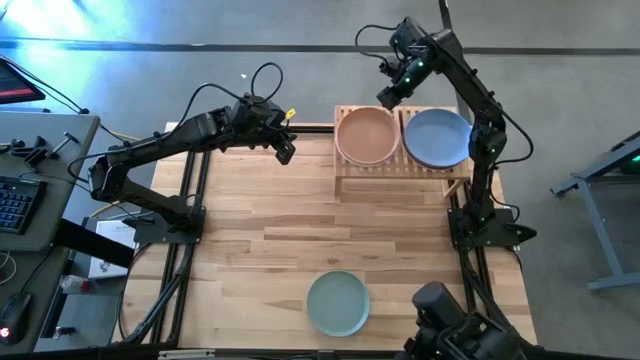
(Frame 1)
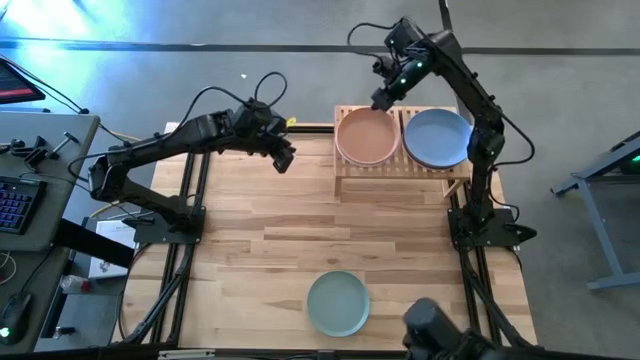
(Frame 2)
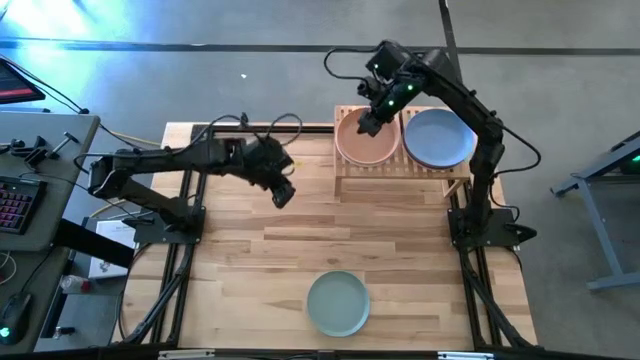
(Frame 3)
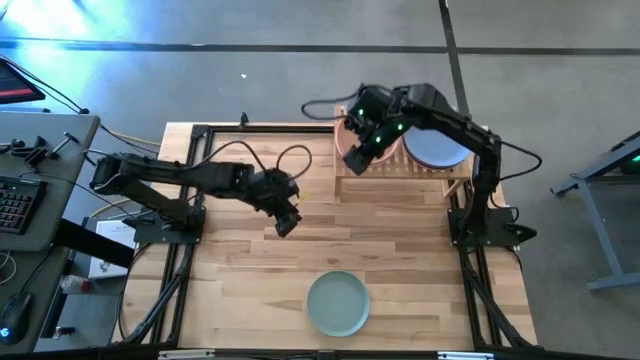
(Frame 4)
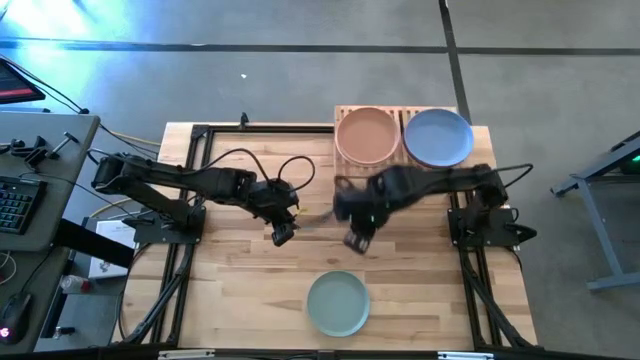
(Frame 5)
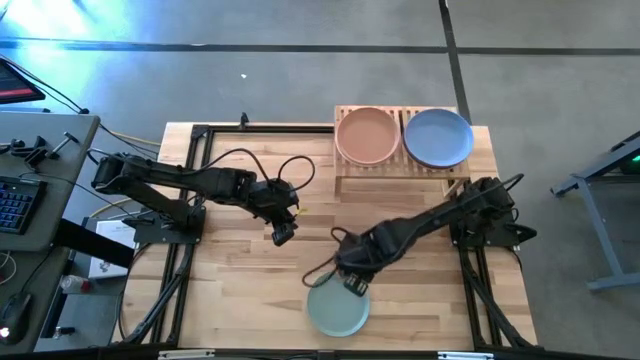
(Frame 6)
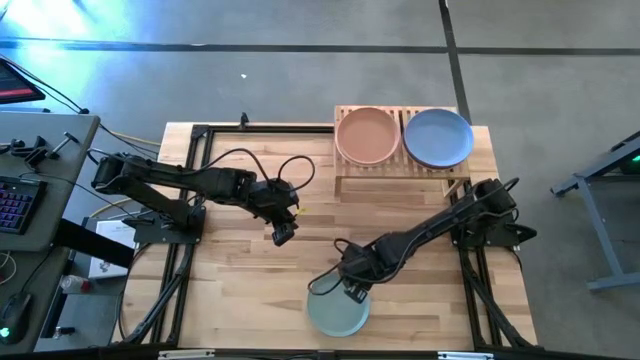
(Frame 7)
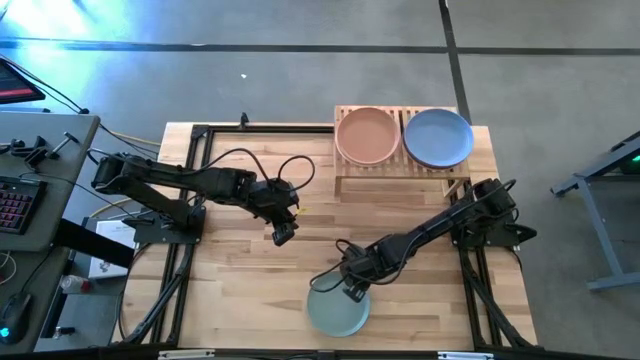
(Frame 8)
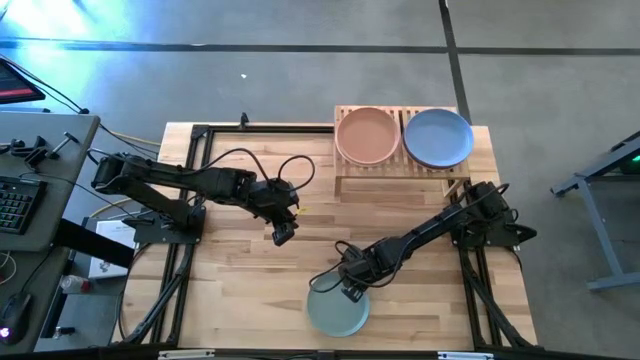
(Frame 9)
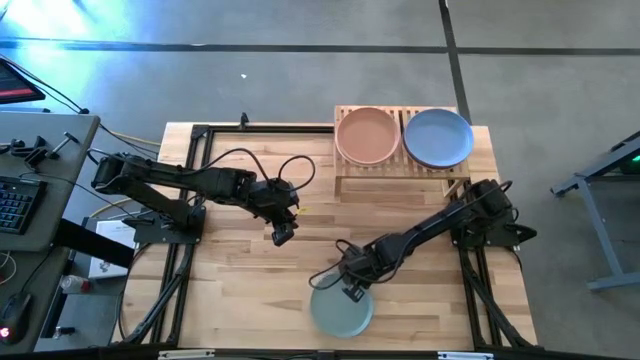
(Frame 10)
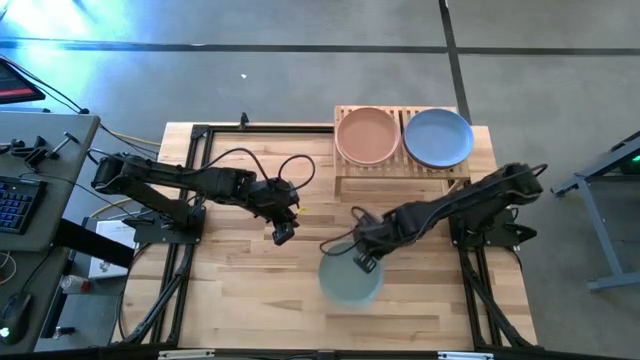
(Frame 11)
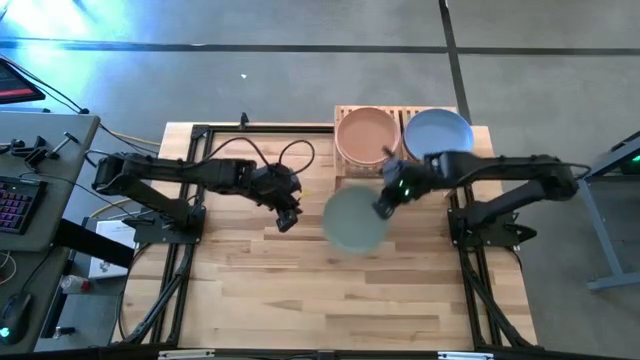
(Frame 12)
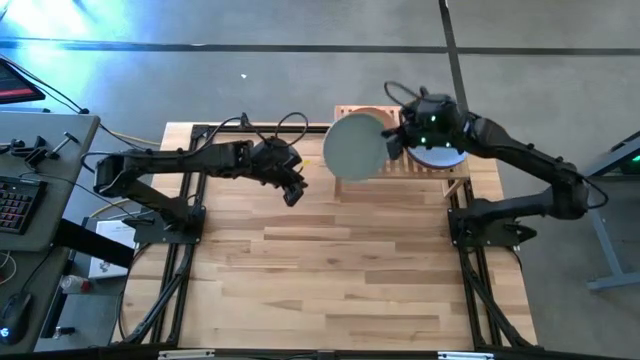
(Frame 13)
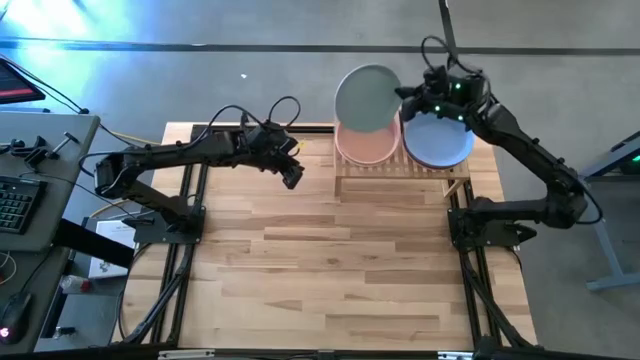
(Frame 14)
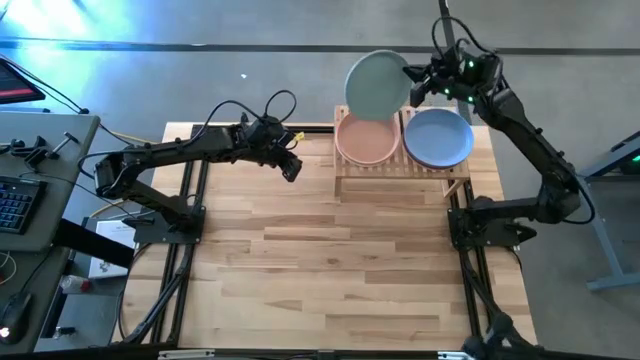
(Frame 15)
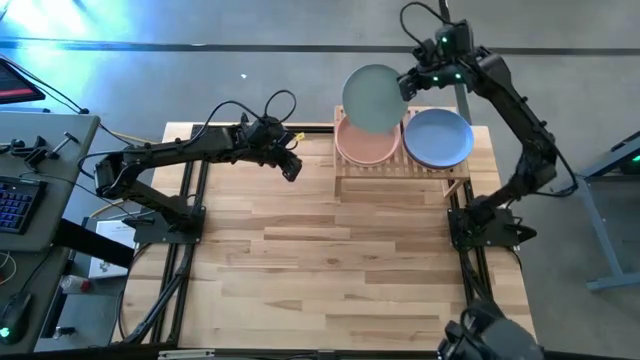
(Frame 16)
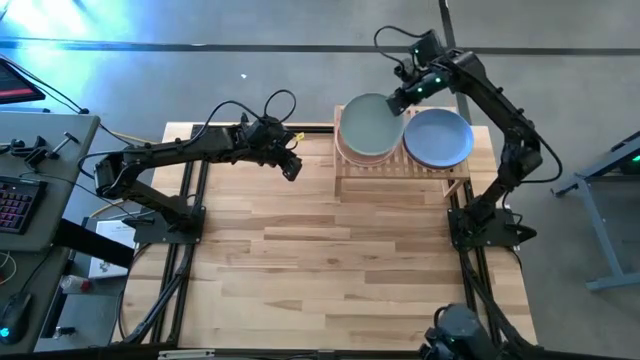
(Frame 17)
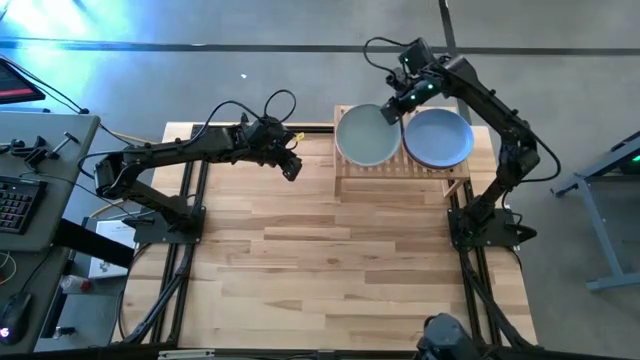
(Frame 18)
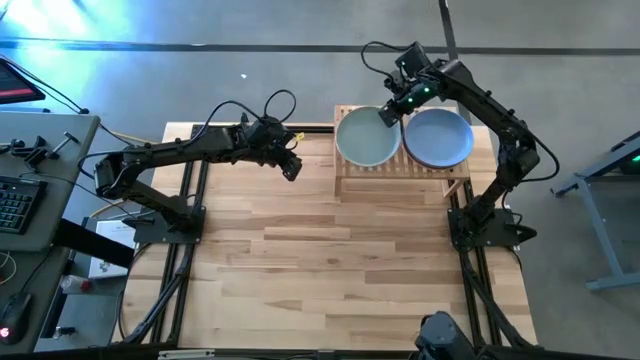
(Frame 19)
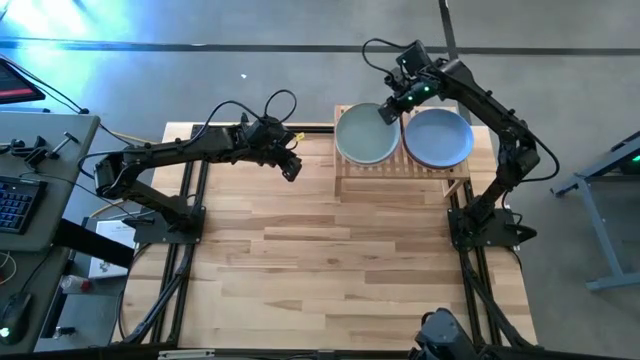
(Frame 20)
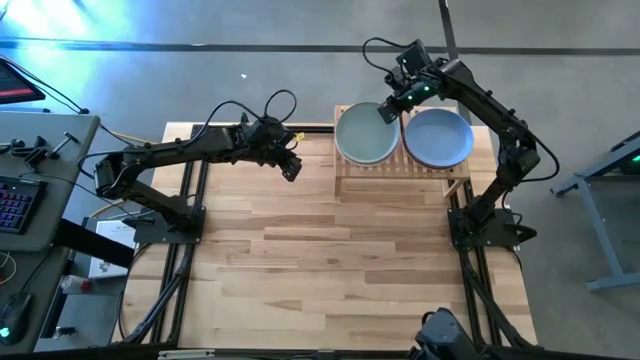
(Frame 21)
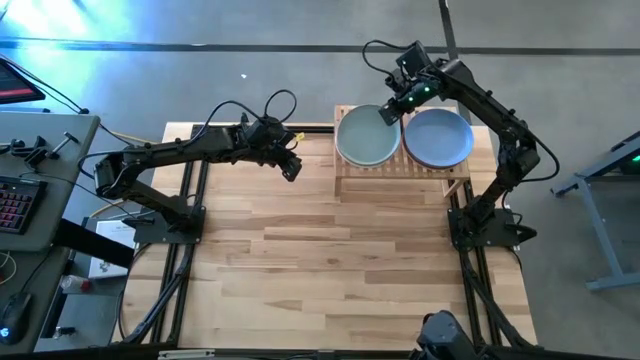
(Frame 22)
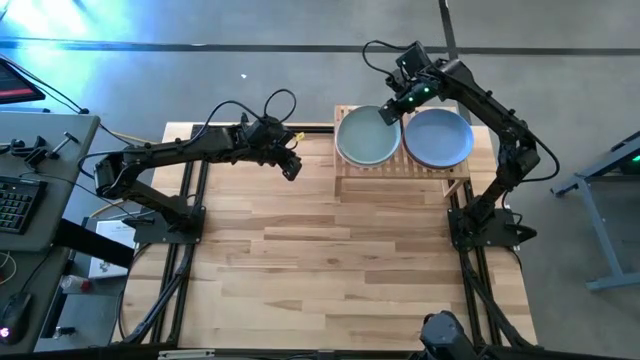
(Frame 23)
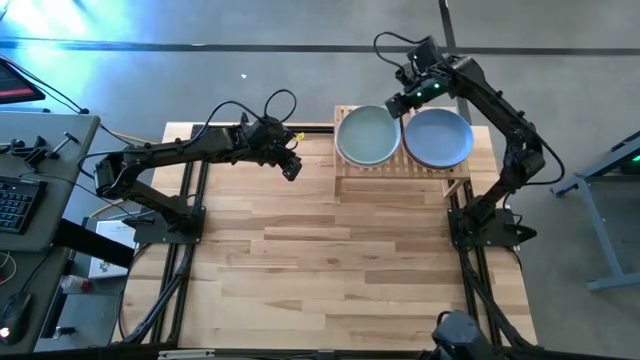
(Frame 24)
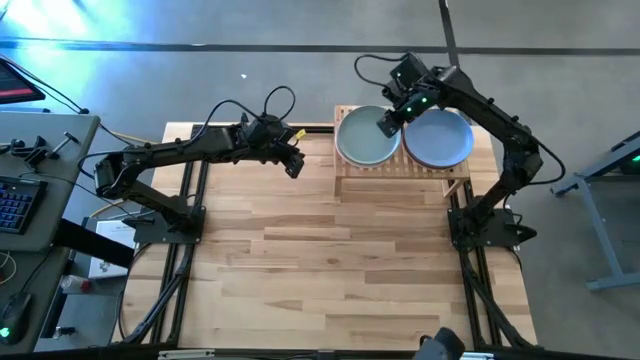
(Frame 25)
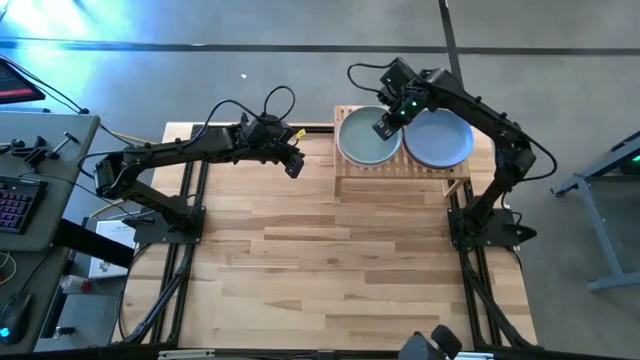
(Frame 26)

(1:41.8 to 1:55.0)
Task: Place and stack plates onto a shelf
Stack the light blue plate on top of the beige plate on the shelf

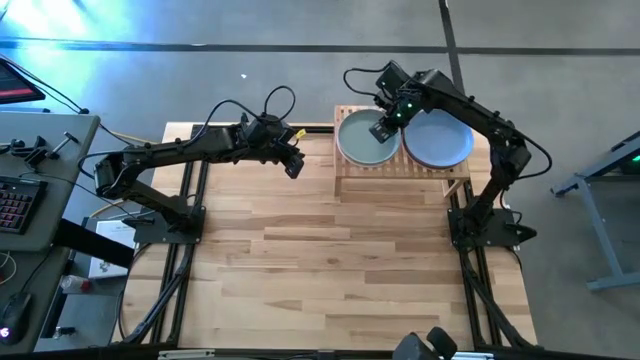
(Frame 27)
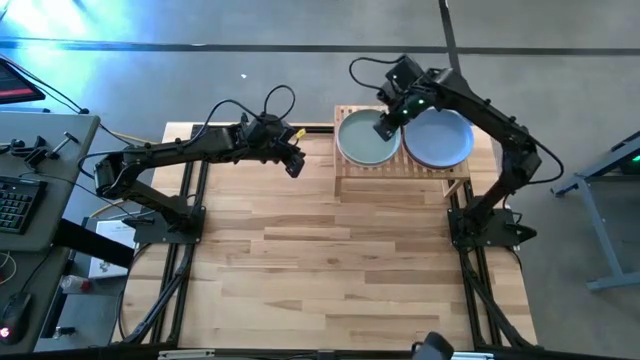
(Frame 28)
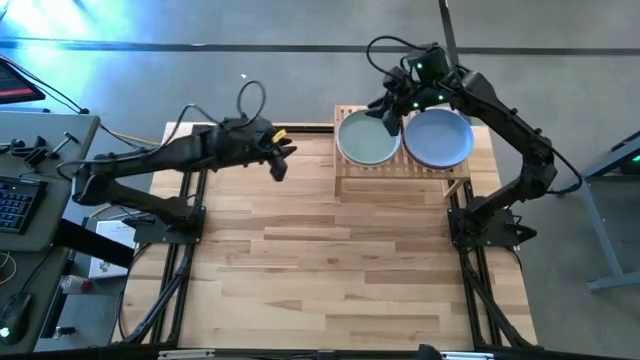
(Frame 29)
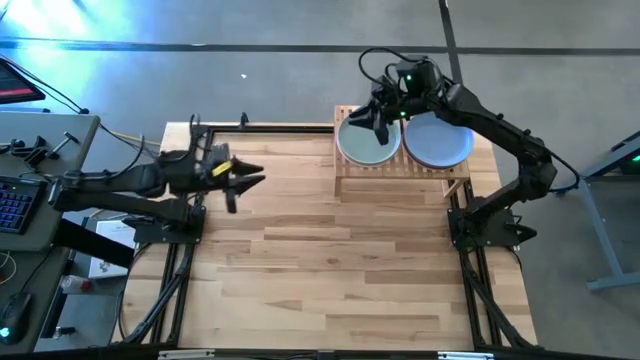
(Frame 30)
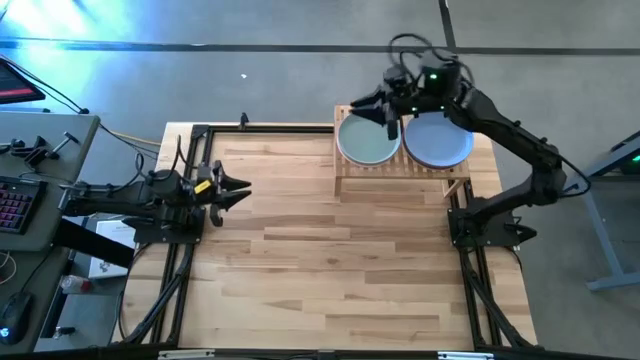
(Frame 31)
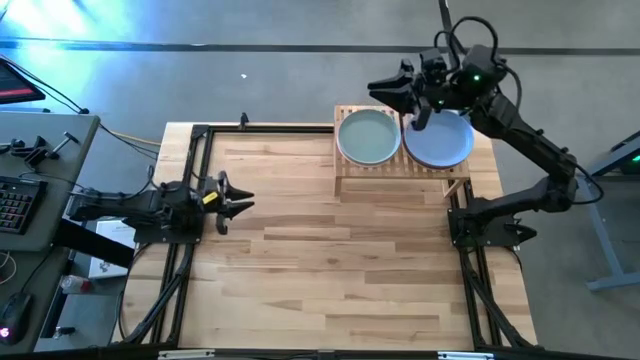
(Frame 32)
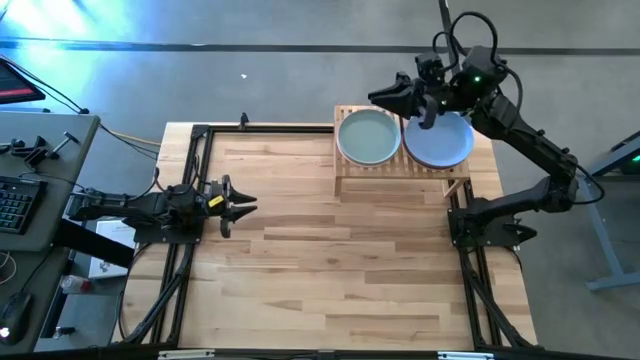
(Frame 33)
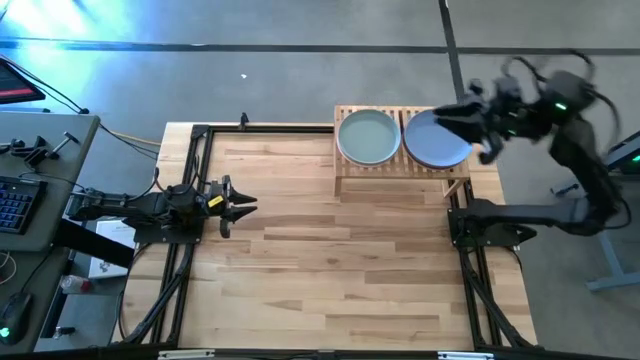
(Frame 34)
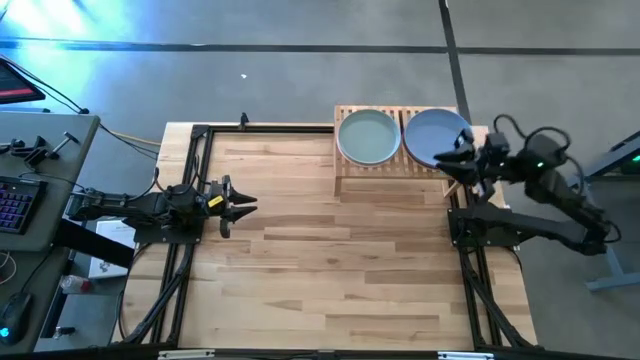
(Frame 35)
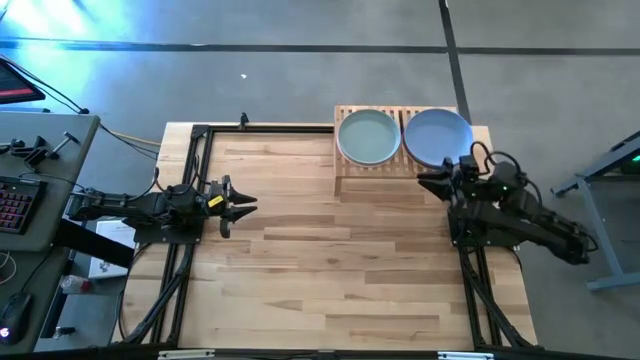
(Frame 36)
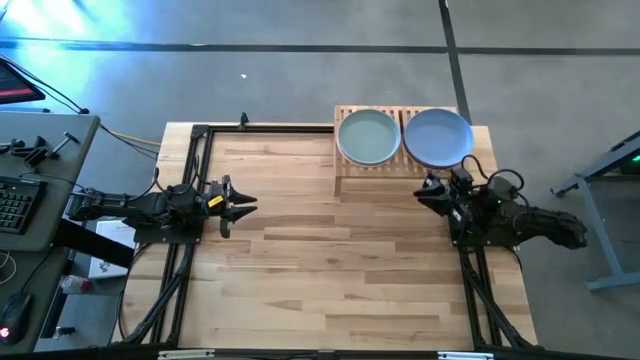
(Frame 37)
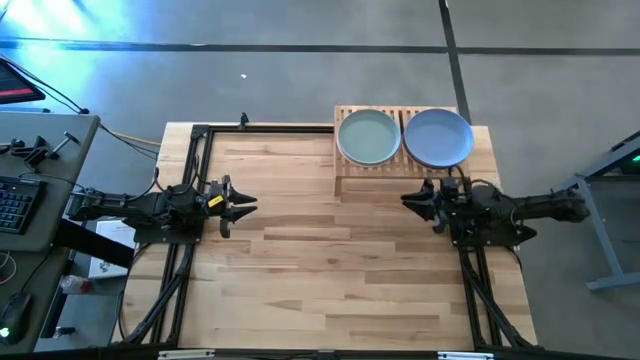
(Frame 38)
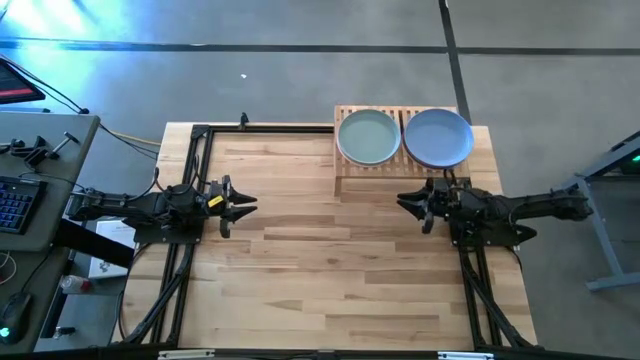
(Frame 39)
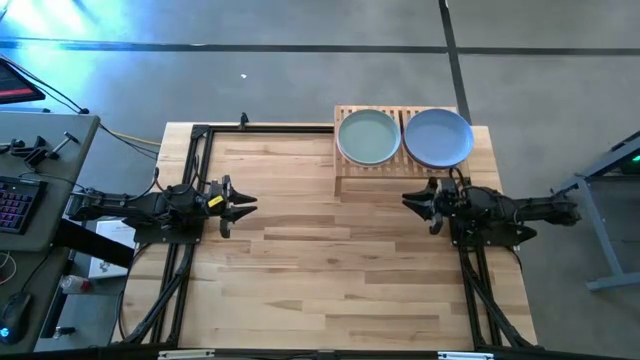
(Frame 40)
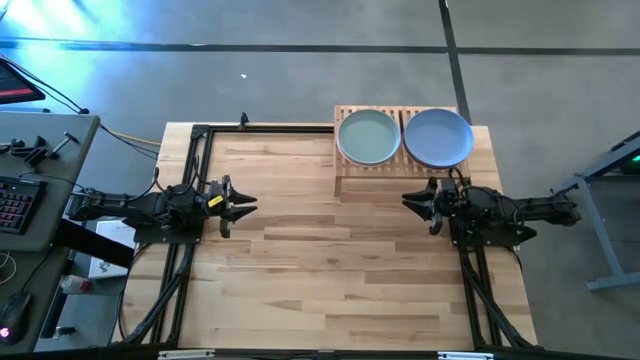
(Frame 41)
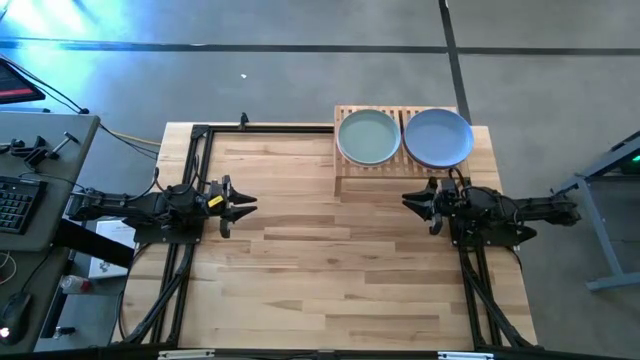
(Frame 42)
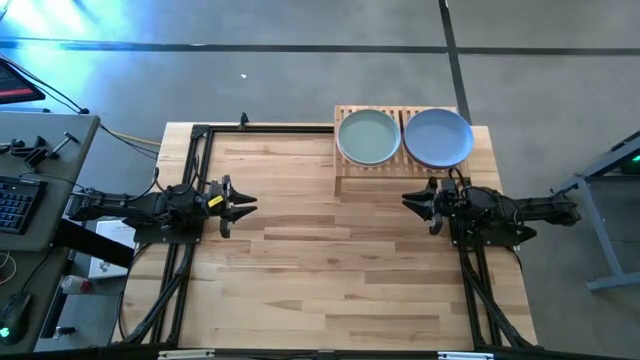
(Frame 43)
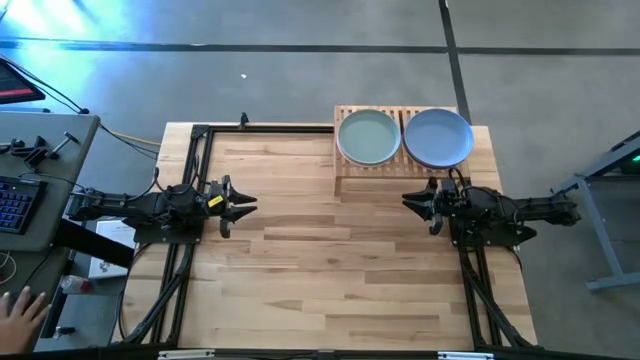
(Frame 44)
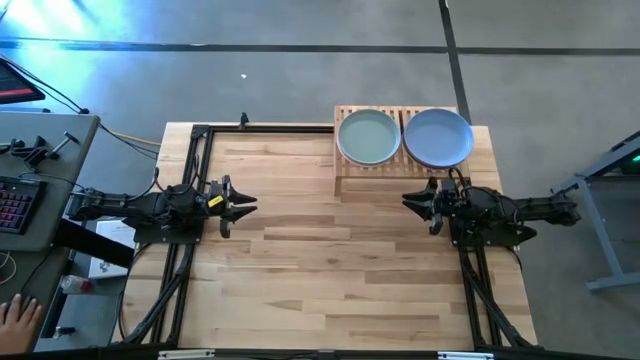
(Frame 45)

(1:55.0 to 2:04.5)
Return to Home Position
